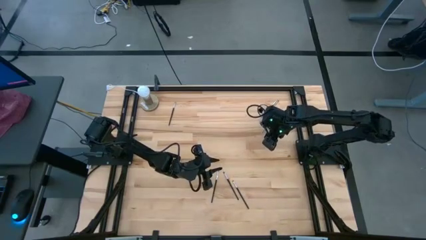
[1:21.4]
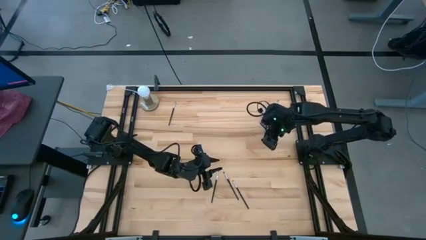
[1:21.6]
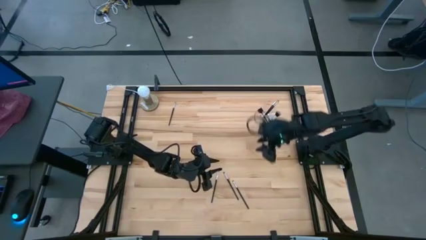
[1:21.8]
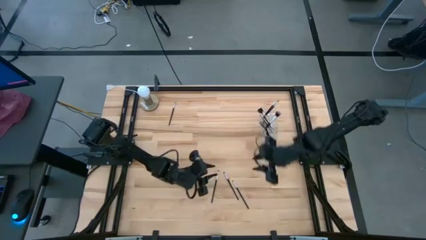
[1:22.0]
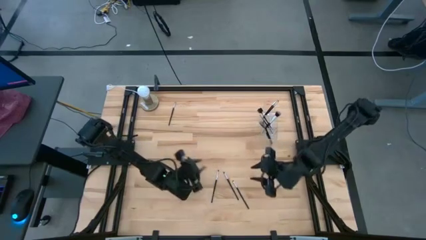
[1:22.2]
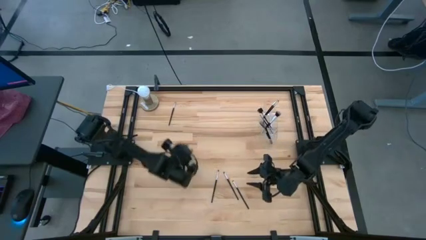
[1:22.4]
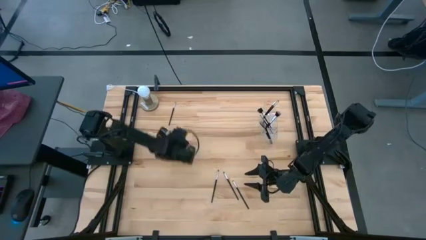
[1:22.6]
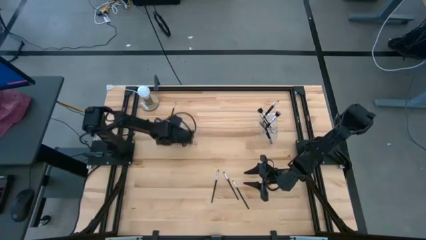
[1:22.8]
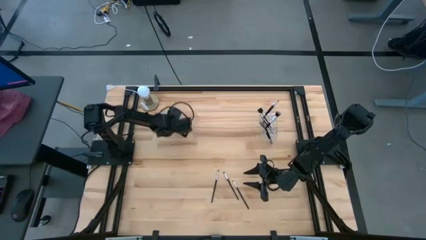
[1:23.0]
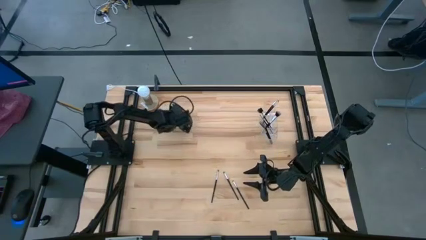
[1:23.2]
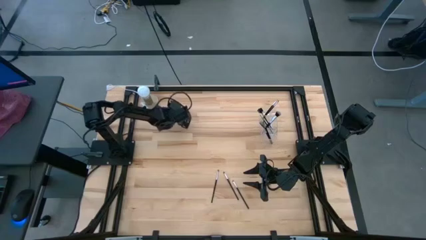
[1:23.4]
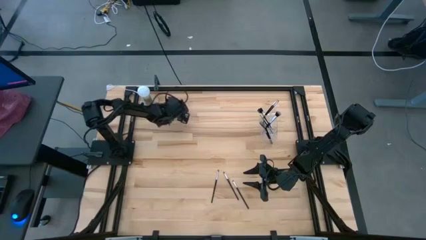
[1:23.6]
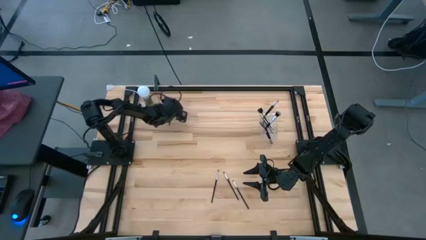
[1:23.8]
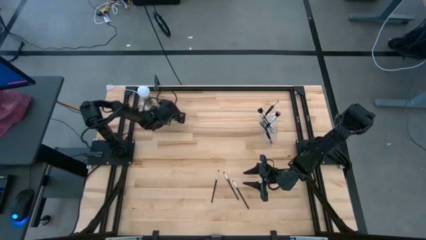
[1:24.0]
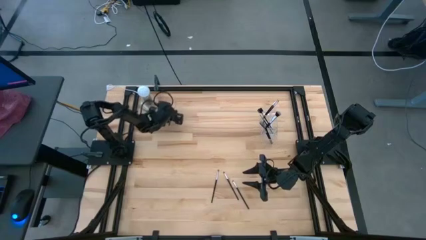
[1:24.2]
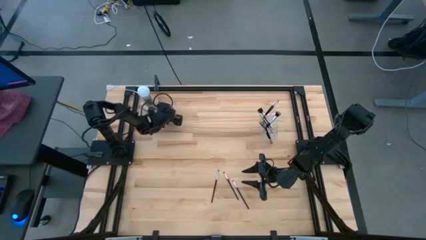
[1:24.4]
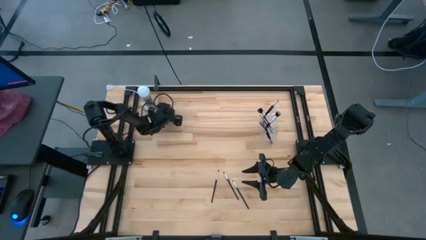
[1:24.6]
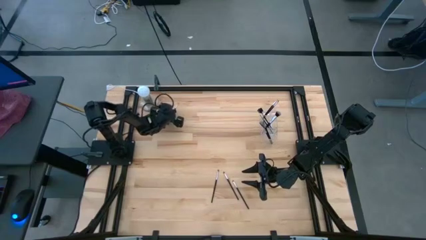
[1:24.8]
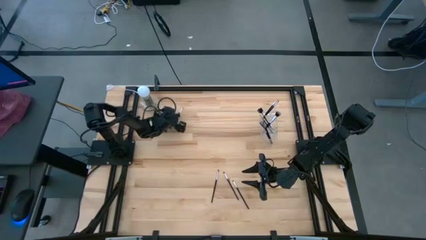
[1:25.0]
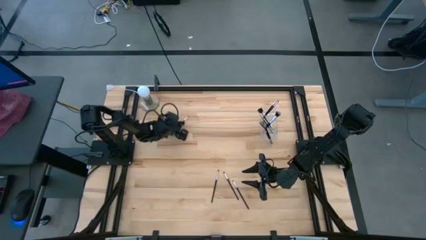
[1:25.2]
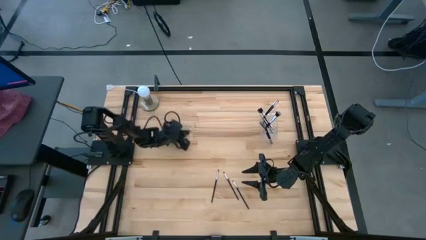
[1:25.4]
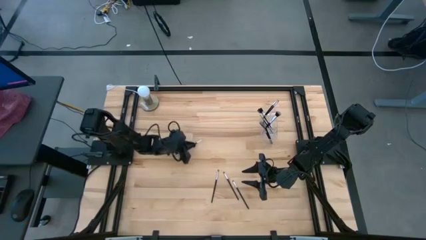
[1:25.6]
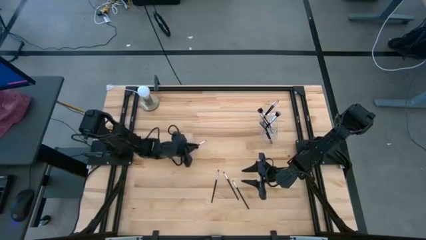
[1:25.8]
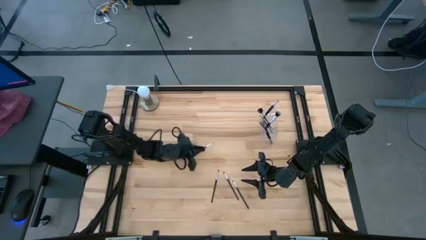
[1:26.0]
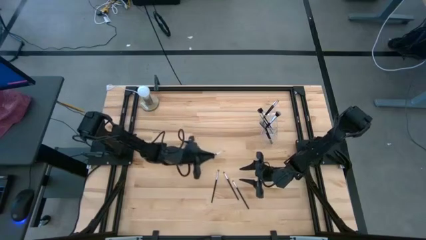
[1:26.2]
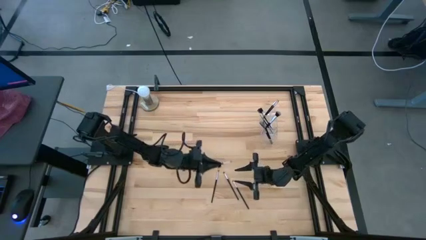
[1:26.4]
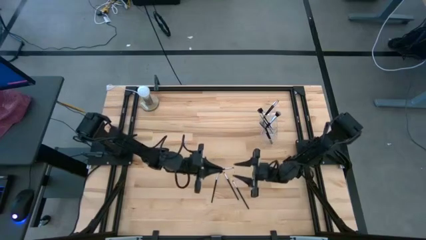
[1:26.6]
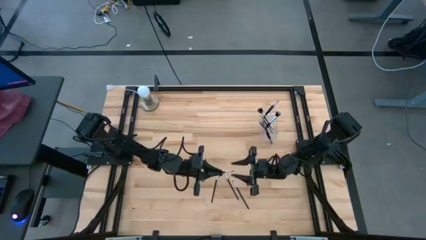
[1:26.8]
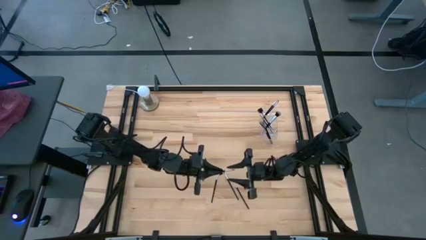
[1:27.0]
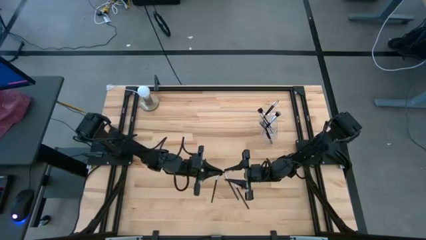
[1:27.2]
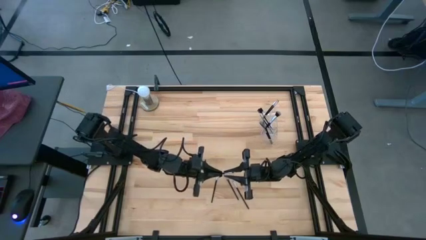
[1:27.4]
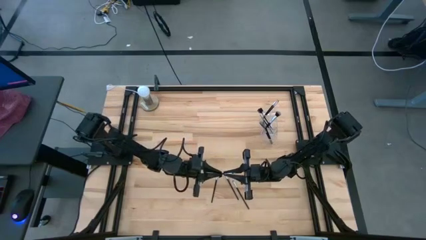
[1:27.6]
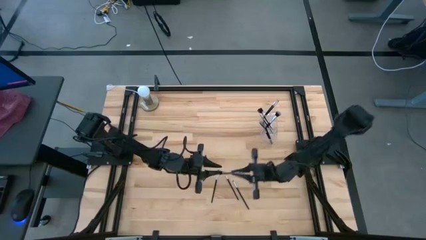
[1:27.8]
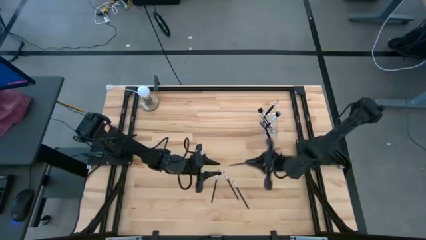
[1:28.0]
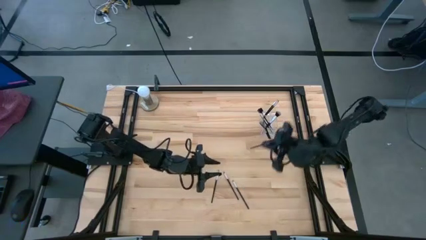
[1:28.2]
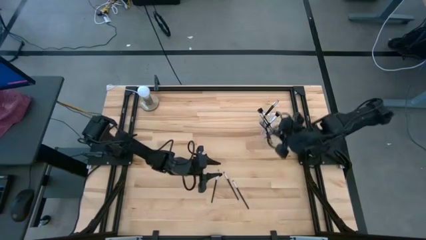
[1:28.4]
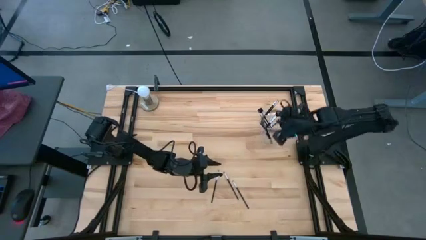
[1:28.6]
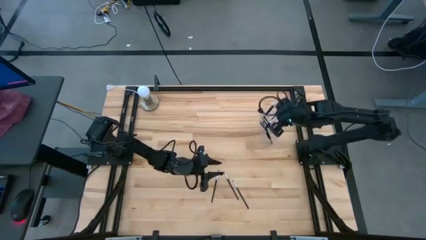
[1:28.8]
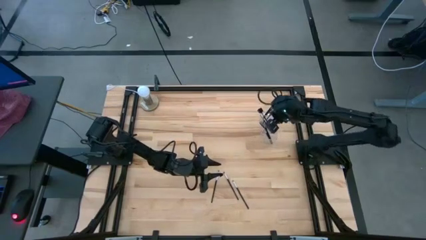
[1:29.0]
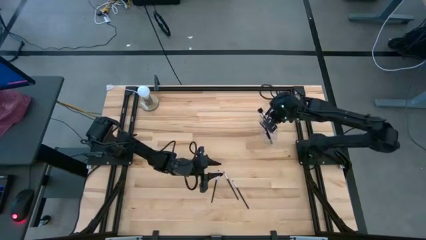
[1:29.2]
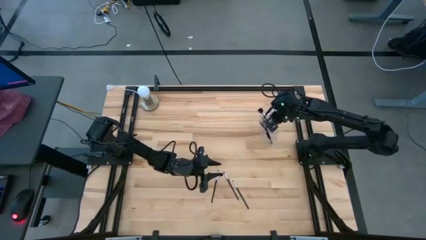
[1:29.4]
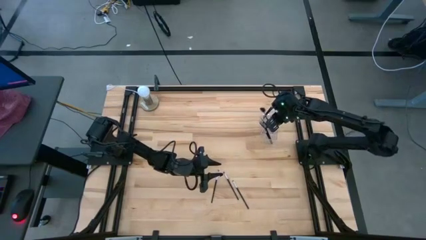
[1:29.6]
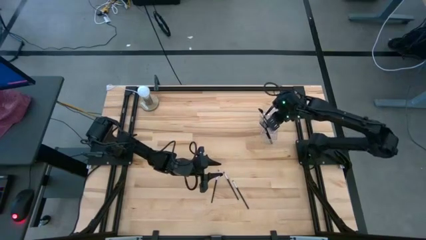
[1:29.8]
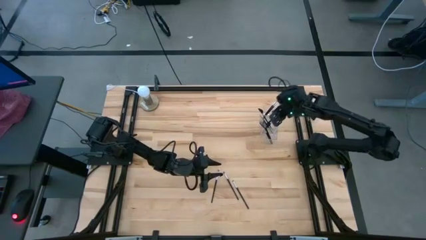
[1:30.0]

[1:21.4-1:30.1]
Task: Sort items
Put the silver eyeshadow brush into the transparent organizer

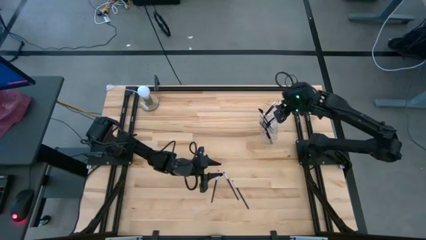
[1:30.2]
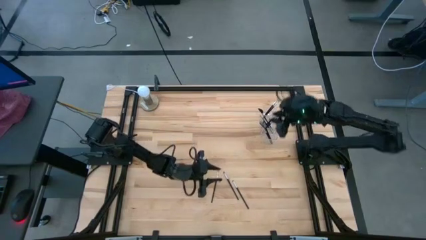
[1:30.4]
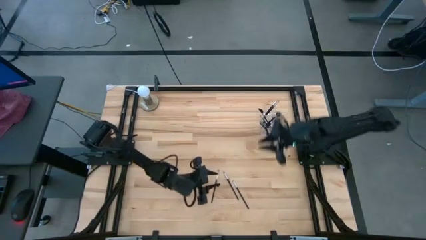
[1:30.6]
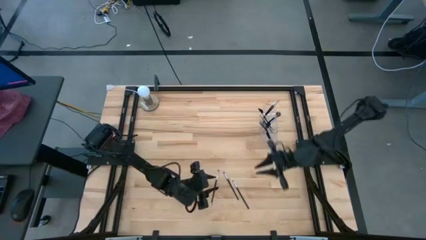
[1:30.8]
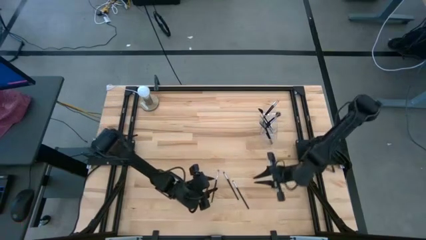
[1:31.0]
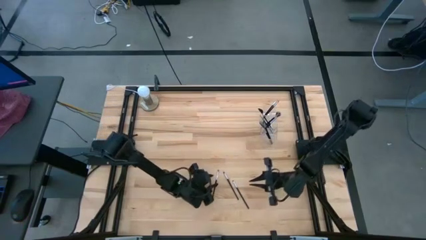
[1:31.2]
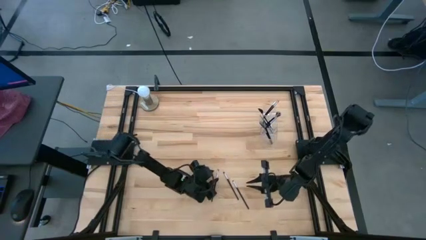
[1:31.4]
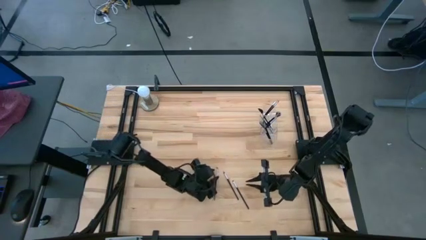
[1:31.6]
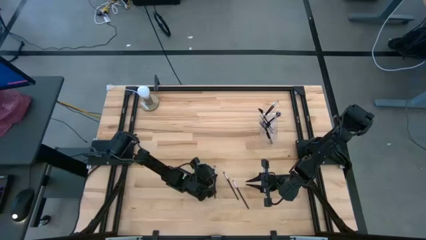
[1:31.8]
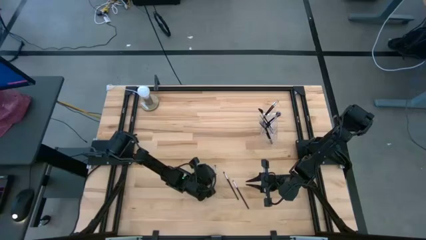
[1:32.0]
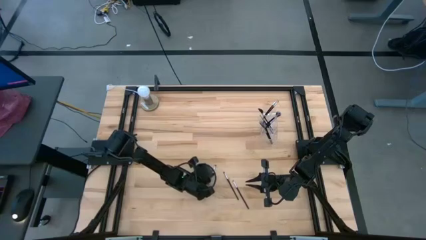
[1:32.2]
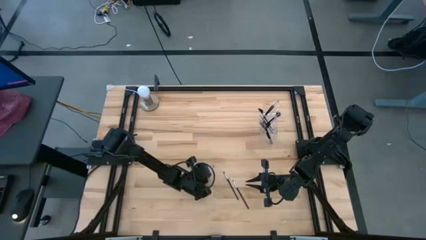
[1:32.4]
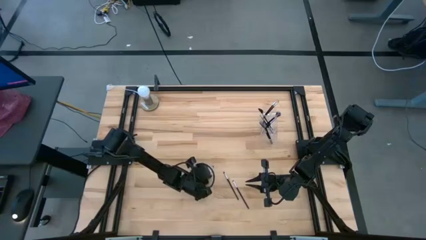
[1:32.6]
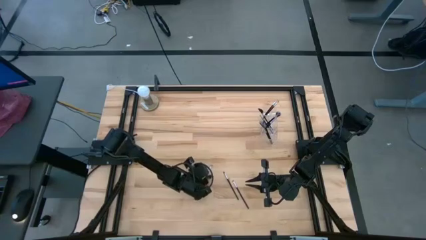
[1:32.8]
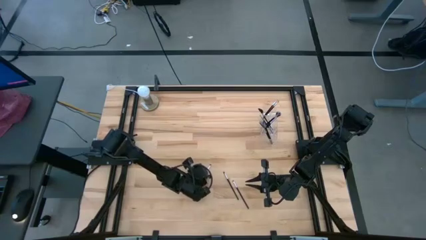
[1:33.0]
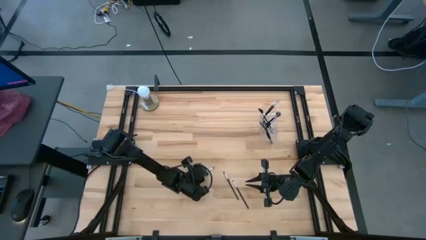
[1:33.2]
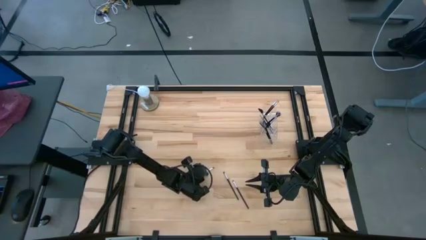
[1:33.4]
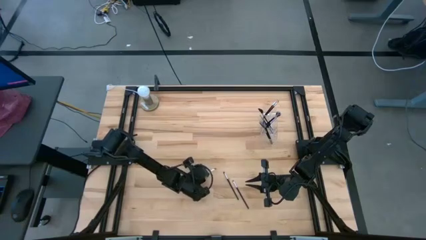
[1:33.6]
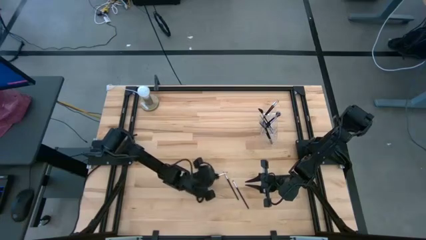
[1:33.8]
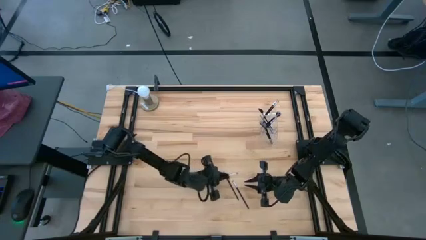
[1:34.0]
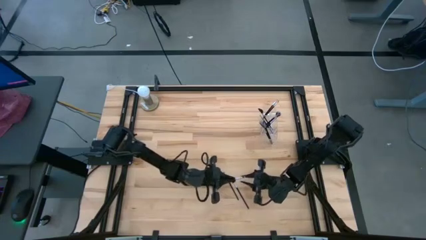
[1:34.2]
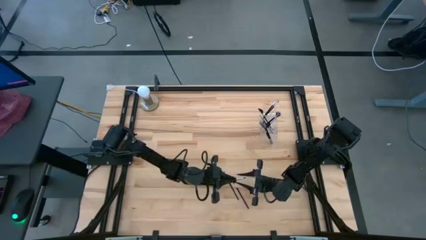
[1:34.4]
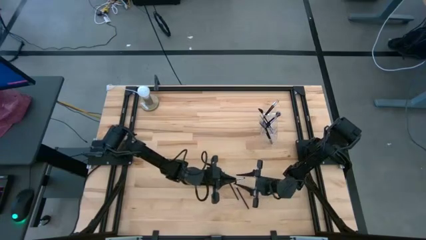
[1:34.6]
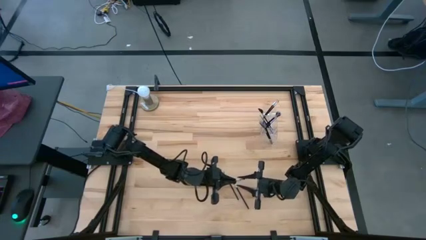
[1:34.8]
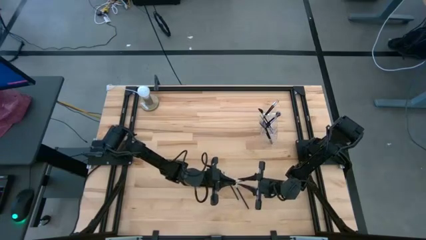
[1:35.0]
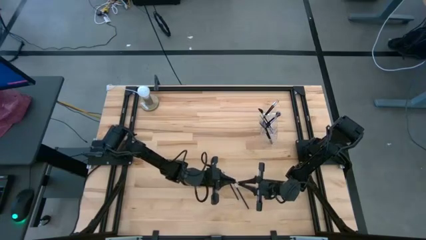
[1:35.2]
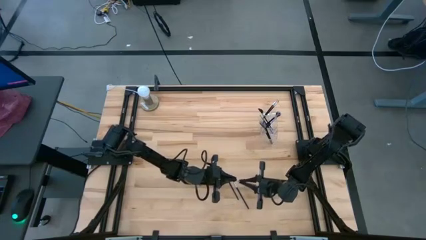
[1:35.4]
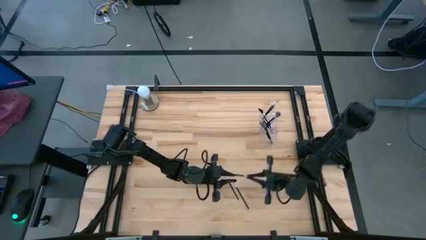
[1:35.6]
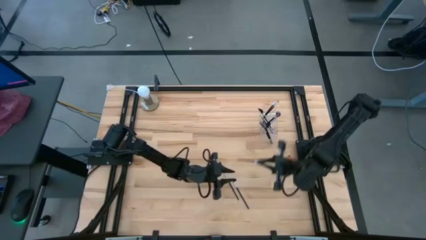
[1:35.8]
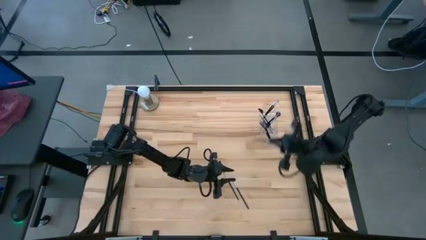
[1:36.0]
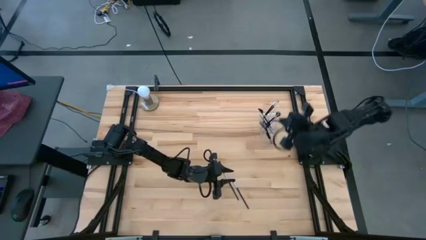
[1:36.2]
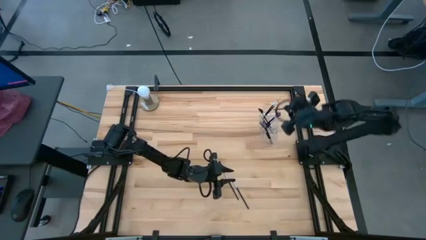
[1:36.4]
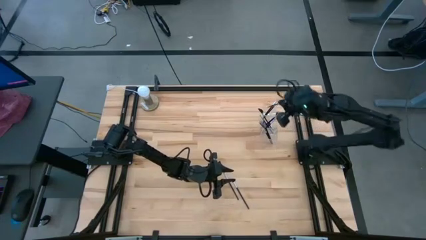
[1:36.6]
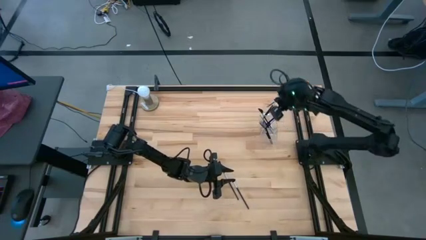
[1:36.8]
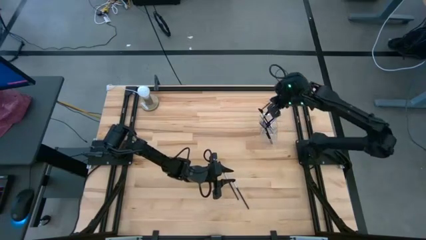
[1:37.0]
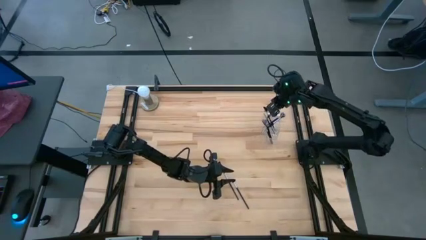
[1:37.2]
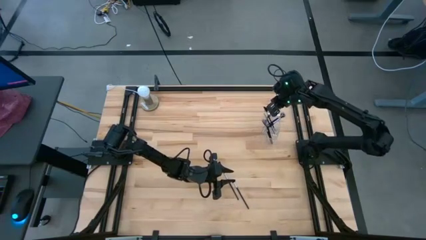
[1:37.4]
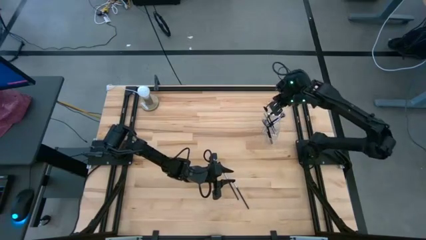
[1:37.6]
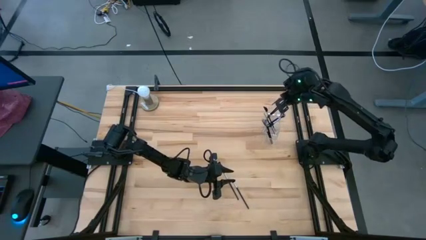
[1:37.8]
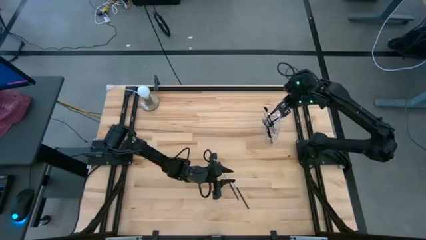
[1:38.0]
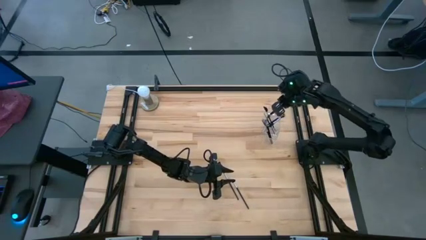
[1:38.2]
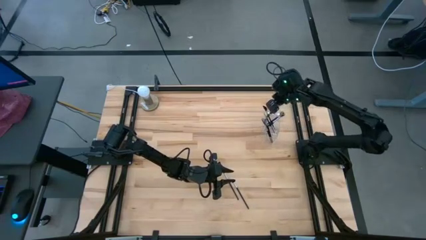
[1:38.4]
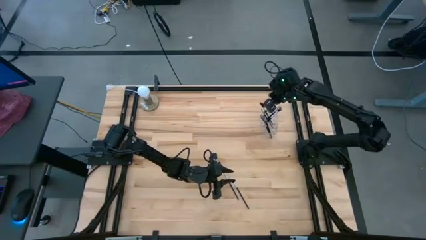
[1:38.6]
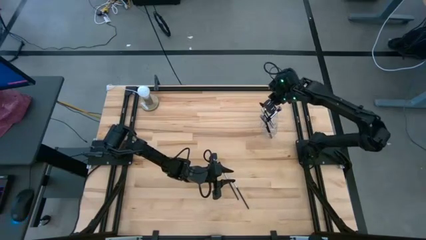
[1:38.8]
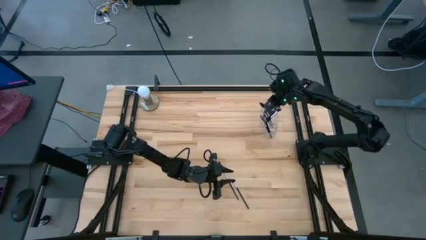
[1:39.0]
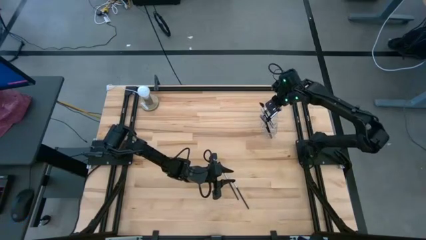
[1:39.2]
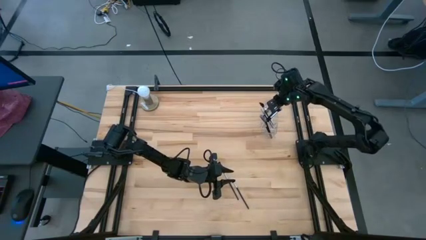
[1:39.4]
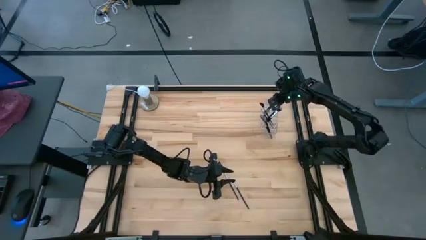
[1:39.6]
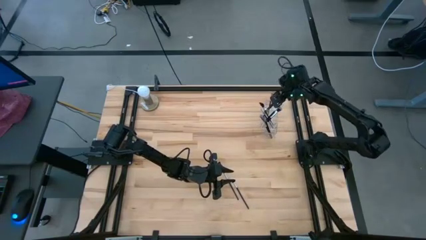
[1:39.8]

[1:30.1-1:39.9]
Put the silver eyeshadow brush into the transparent organizer
